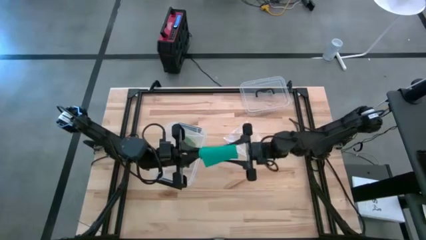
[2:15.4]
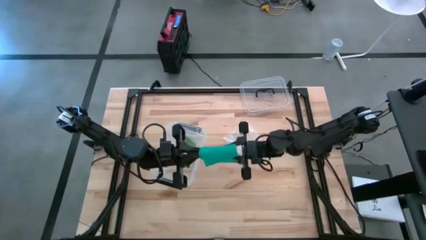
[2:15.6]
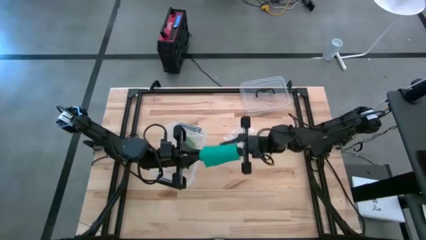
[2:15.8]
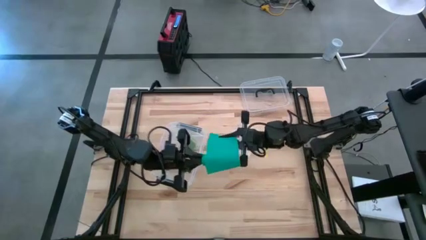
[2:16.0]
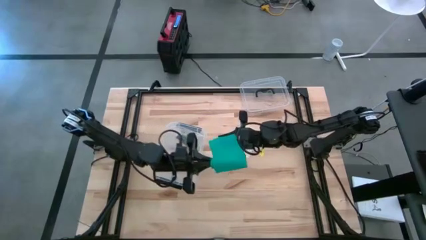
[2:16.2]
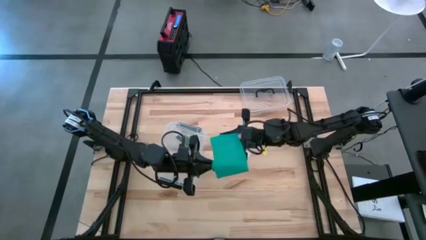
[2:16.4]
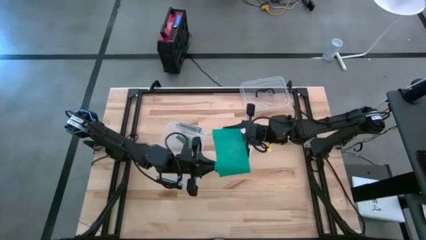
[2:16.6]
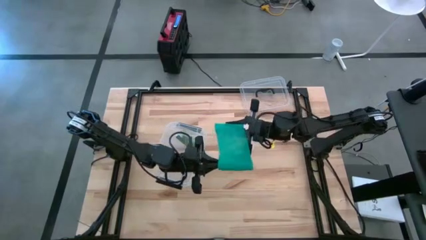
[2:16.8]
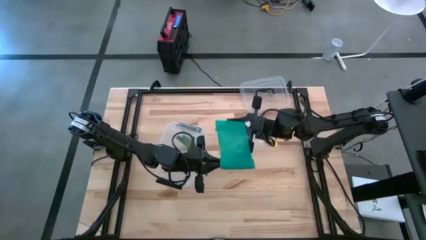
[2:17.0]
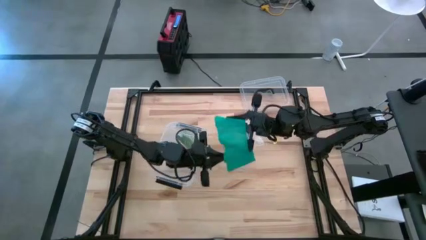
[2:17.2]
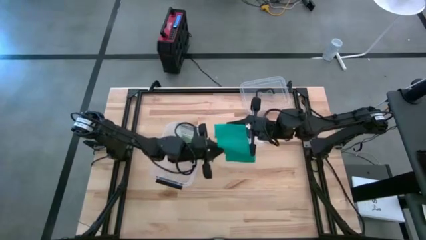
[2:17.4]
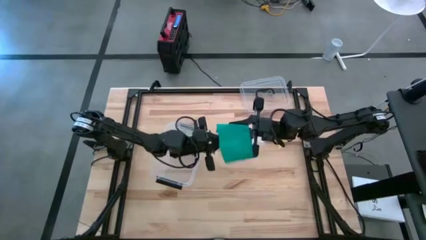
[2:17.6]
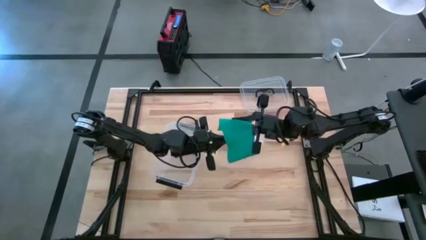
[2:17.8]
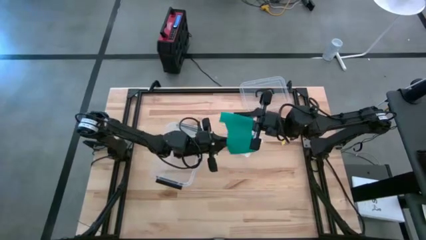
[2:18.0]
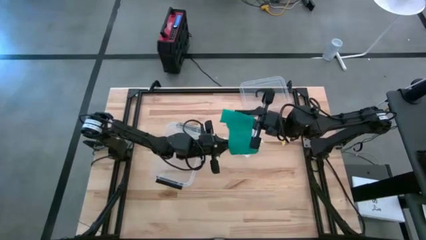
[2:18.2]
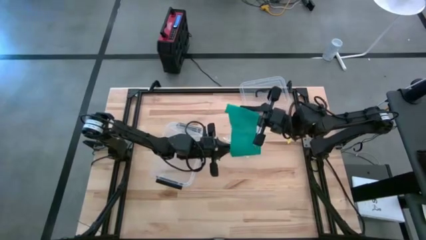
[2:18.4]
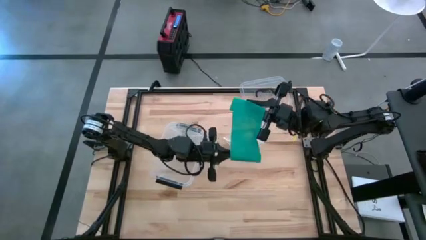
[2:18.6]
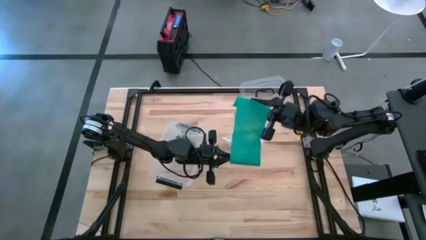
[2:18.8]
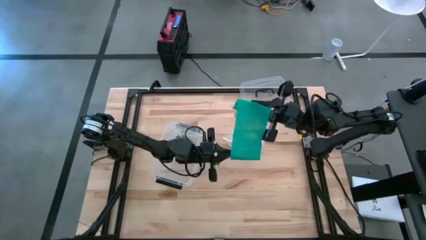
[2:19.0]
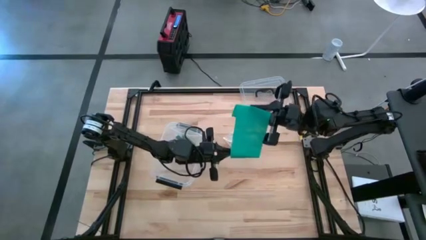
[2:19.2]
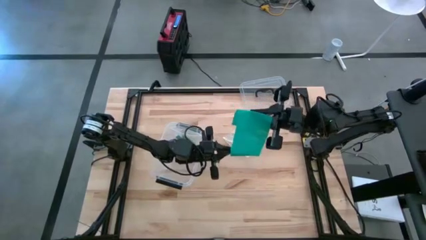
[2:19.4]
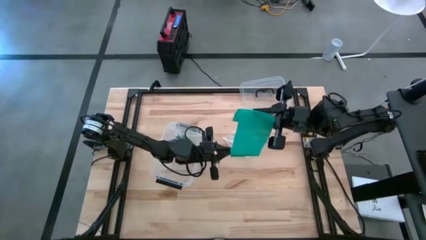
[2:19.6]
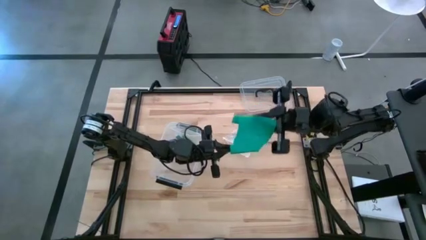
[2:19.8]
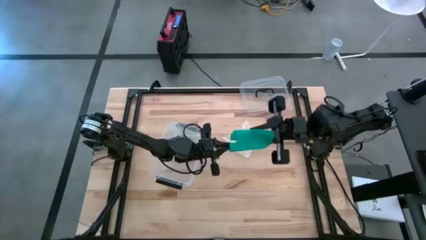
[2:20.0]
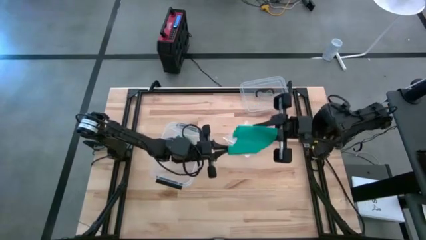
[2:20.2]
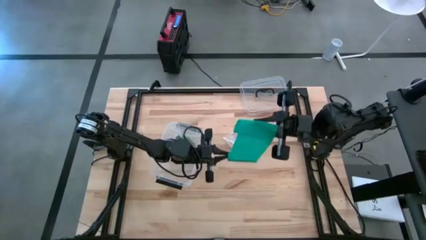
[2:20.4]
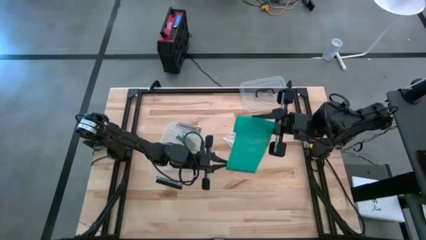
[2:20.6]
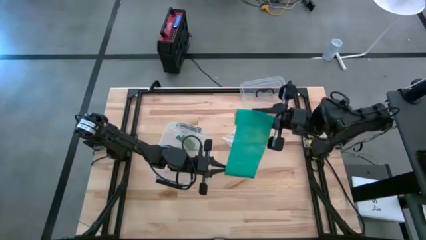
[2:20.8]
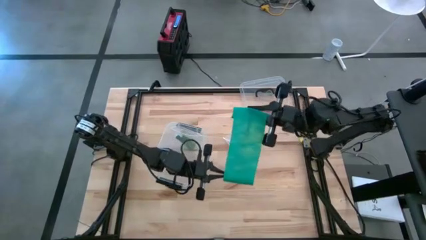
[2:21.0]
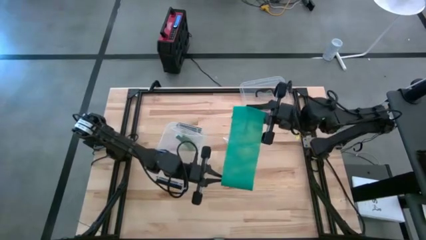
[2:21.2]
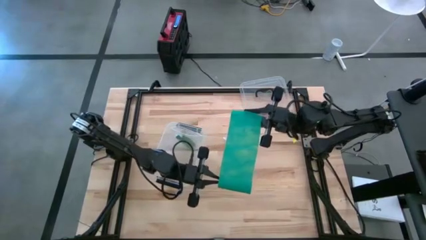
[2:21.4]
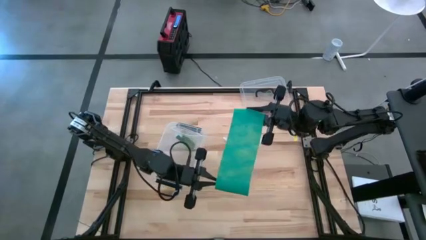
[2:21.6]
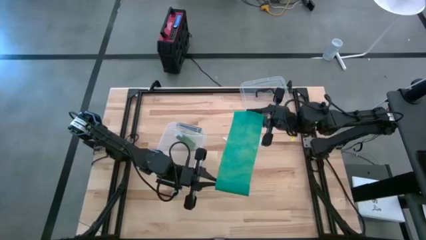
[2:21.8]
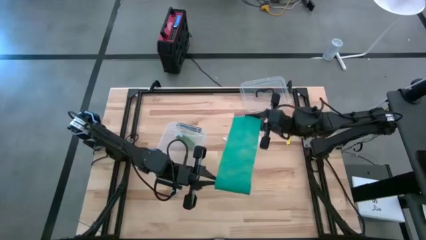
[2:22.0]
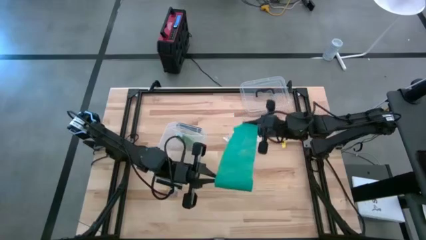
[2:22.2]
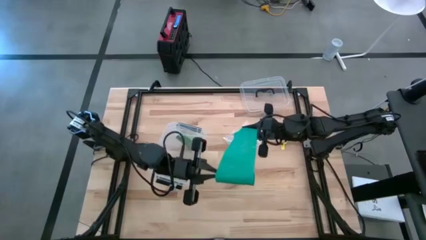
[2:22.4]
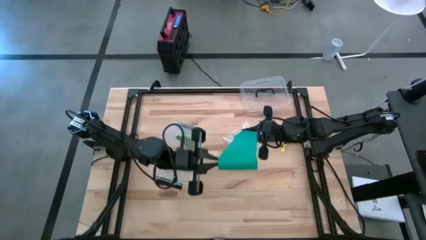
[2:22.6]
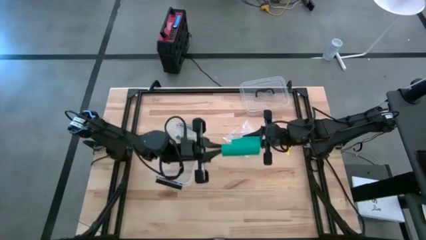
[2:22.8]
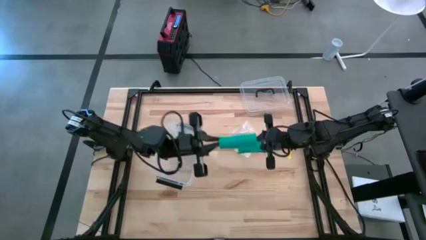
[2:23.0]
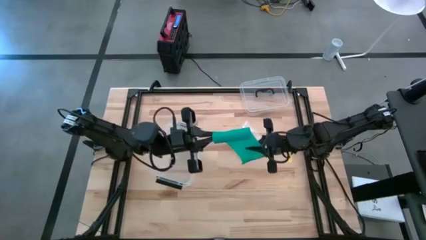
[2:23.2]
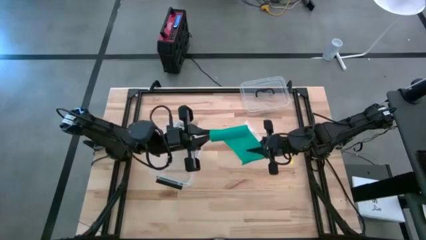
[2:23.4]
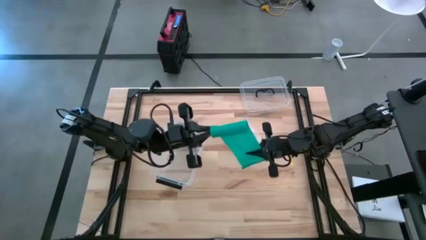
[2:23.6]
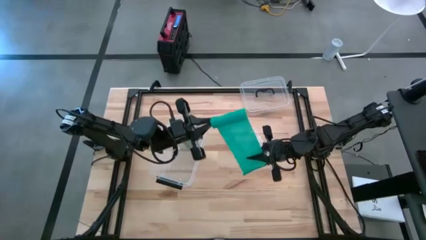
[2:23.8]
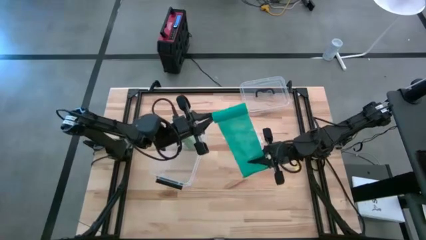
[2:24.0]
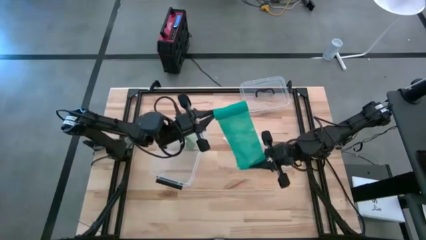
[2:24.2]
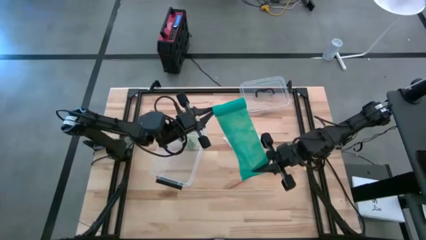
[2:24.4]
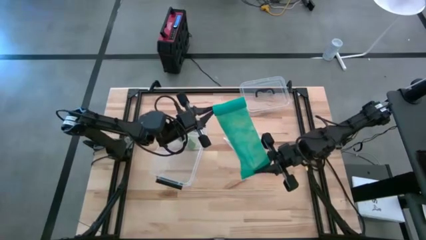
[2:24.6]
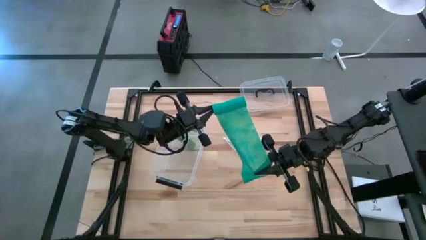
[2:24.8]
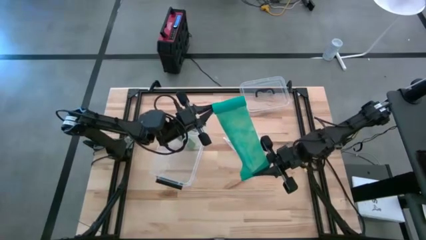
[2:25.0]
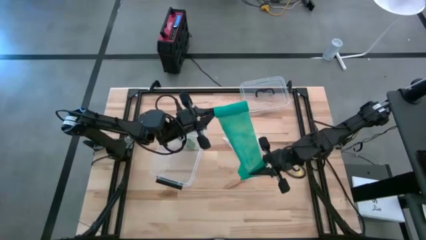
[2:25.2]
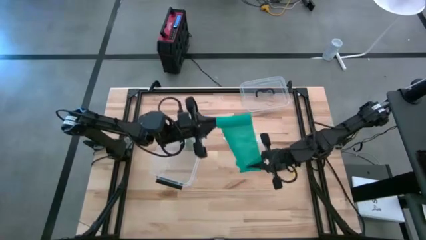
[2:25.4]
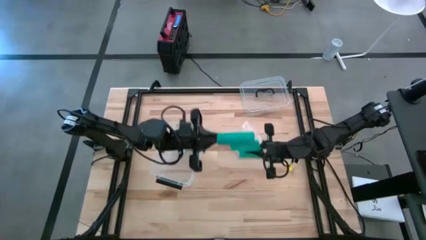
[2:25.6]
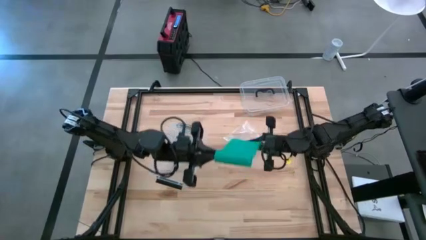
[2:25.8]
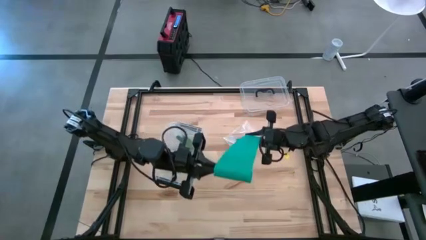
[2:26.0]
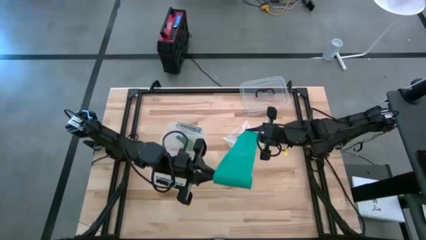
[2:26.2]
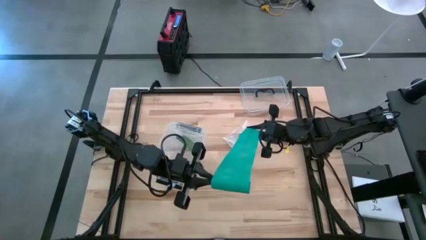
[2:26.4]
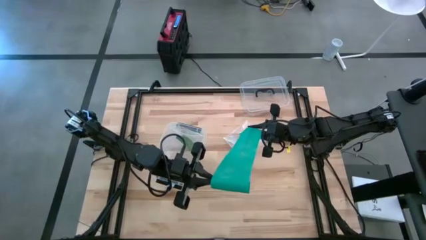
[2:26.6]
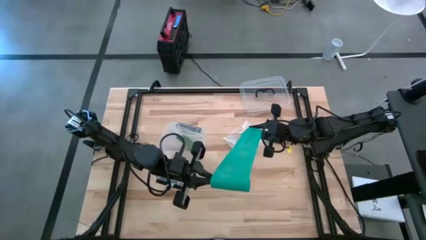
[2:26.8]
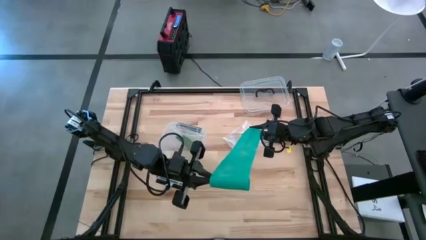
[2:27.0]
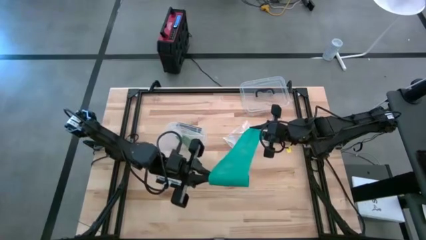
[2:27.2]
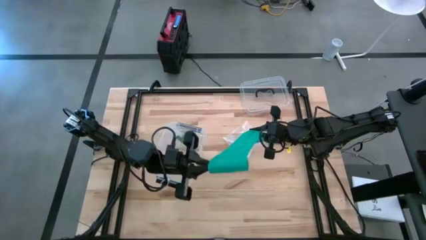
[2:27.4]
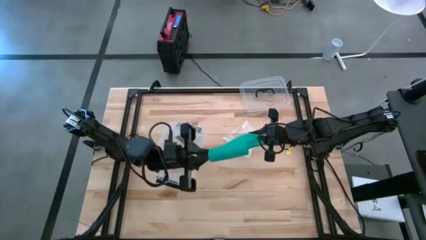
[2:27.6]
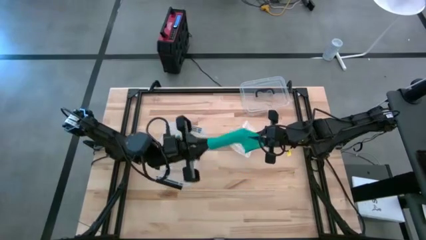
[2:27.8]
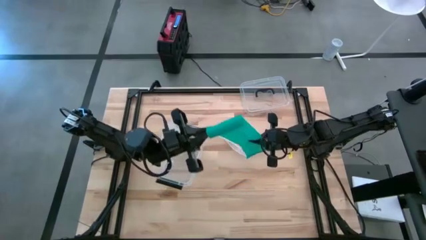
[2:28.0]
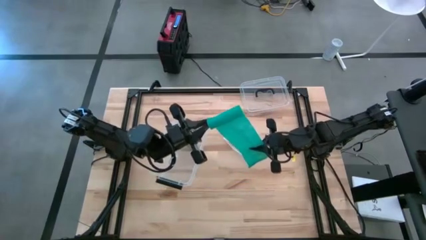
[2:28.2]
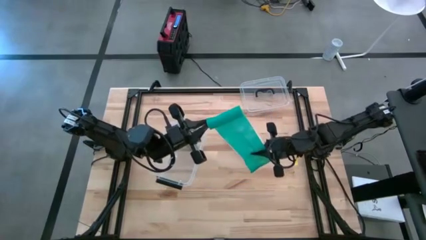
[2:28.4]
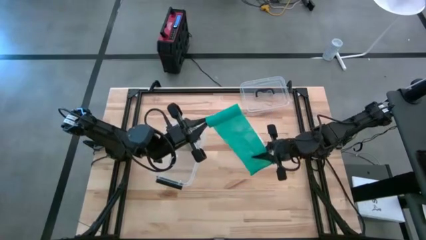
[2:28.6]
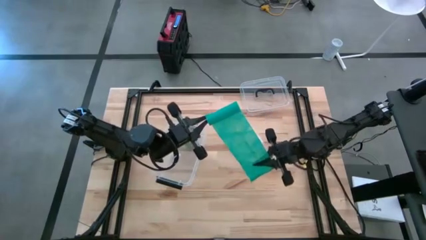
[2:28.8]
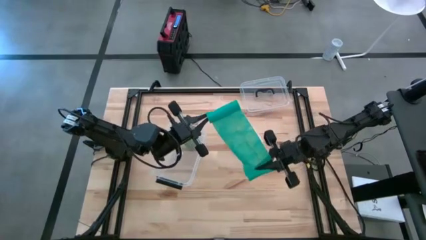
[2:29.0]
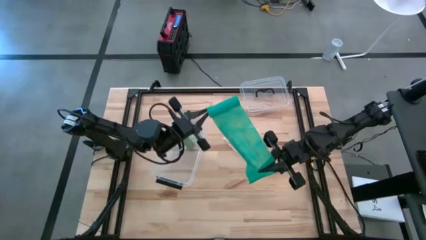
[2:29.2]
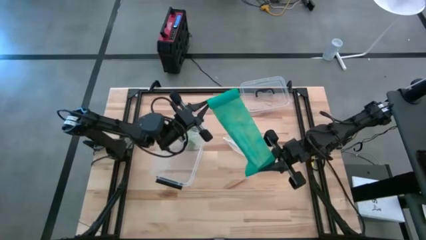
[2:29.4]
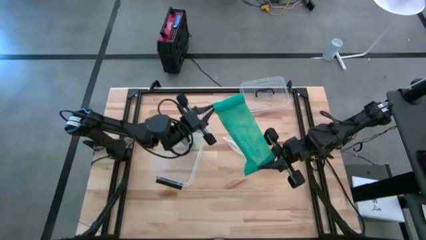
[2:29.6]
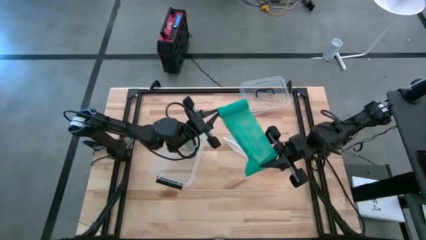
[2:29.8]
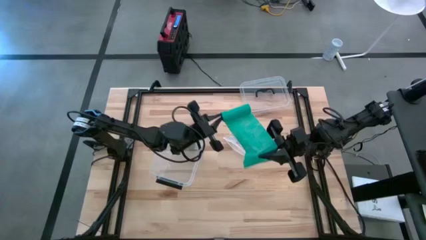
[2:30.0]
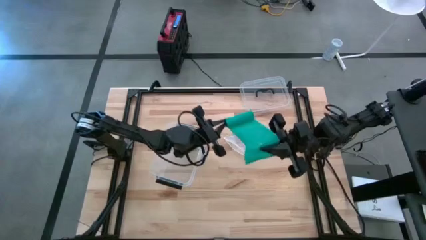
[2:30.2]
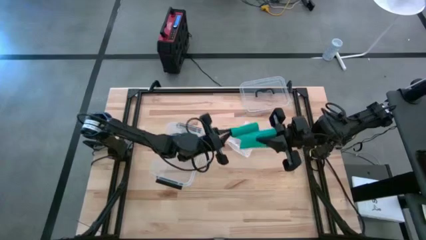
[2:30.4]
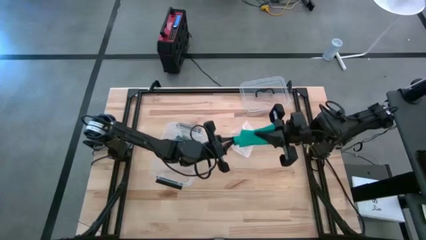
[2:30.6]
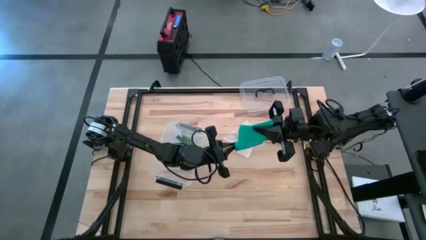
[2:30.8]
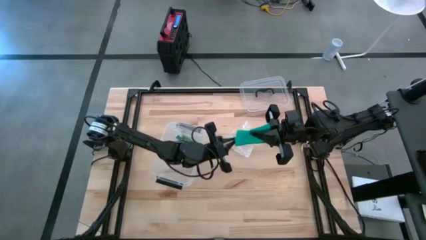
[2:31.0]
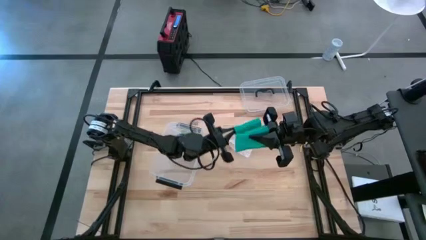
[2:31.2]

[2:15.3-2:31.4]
Task: Roll bandage
Roll the blue bandage

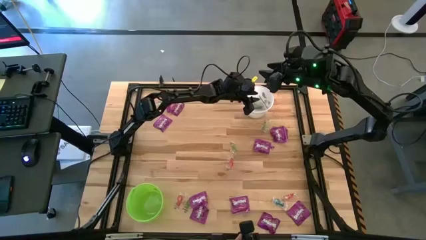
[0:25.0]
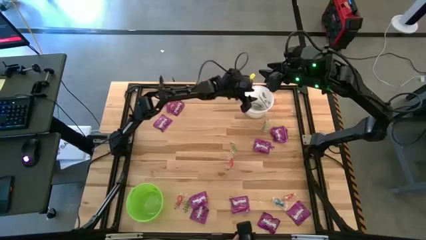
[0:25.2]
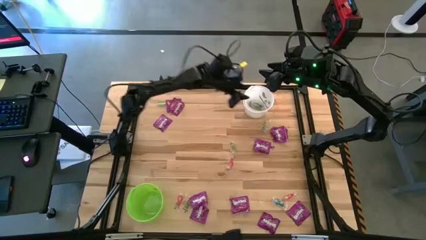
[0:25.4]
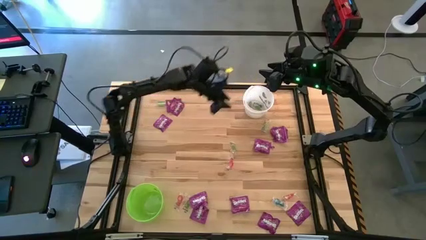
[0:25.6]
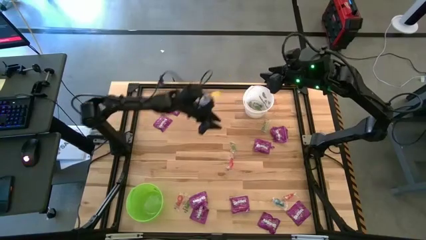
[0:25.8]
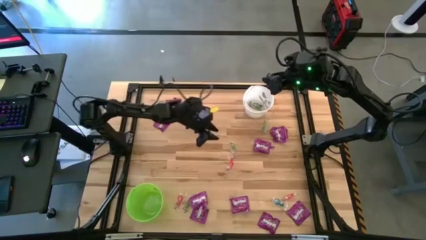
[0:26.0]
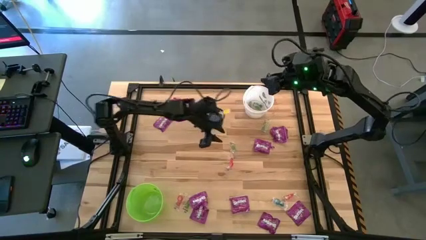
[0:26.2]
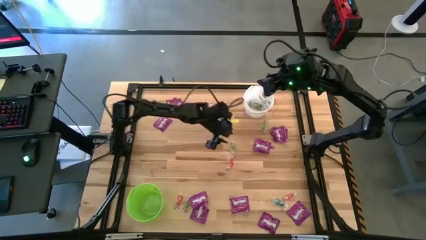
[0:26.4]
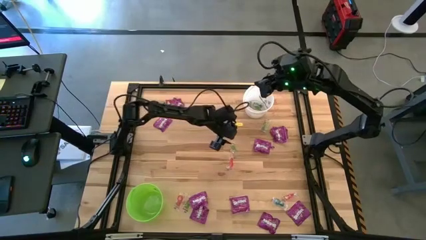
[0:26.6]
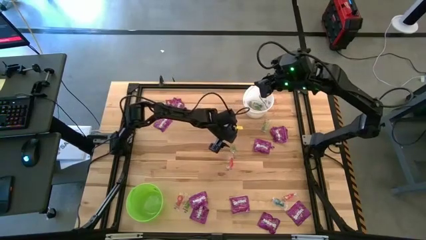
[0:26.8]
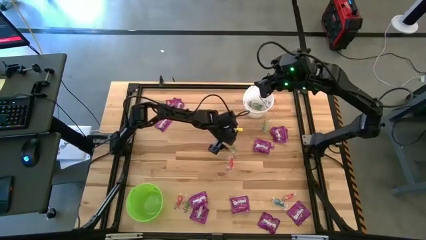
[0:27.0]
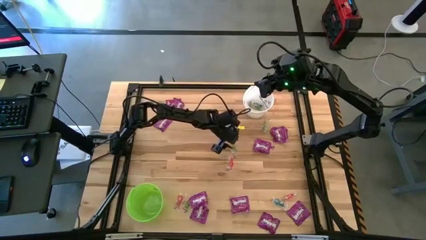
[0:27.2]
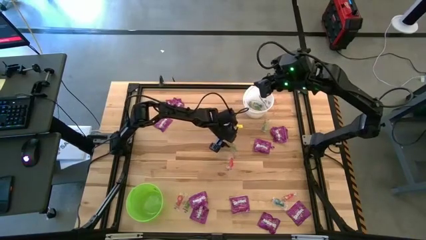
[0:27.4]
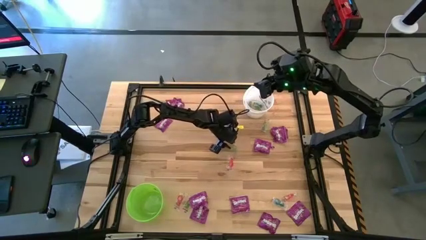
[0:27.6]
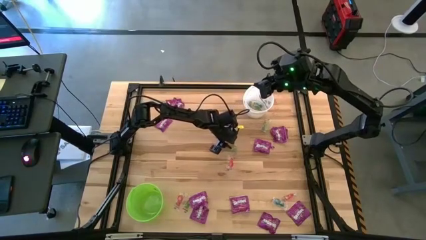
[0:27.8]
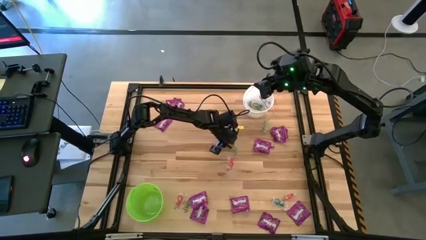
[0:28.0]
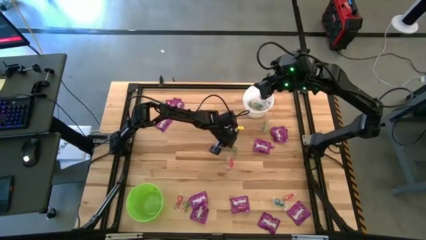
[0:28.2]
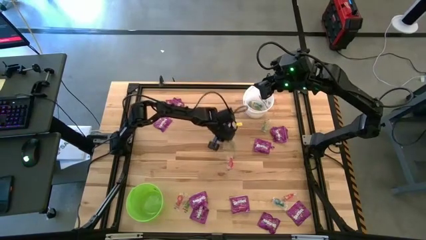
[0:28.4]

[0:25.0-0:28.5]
Task: Sort candy by brand, put in halloween buckets
Put the green gummy into the white bucket
